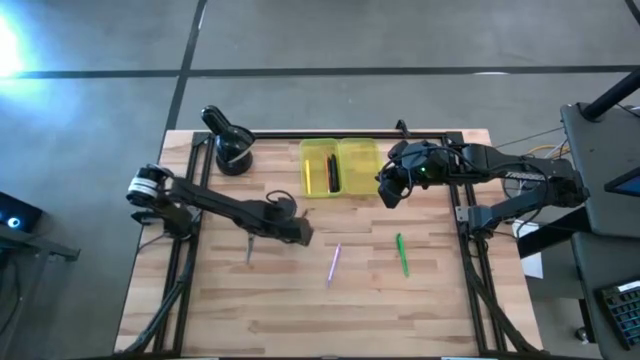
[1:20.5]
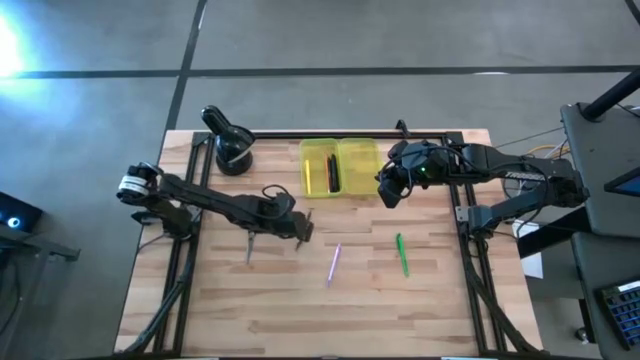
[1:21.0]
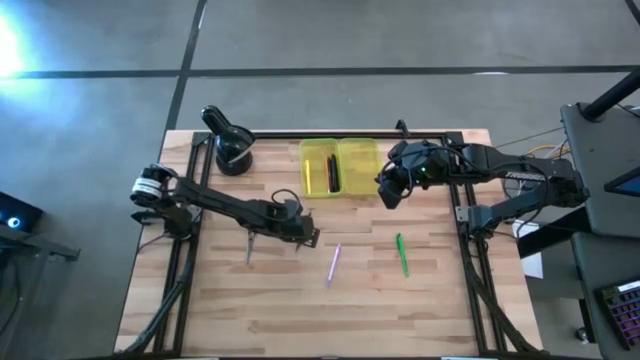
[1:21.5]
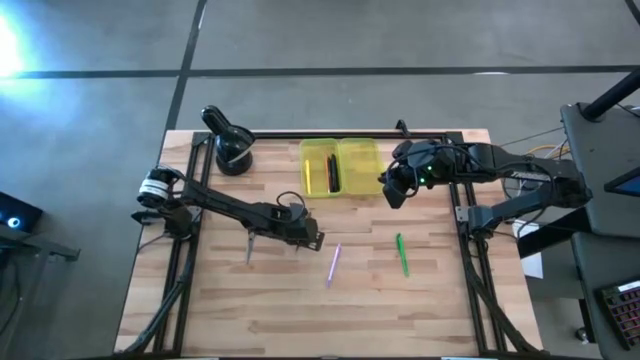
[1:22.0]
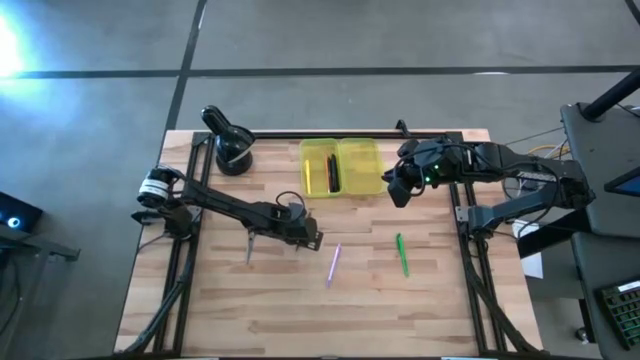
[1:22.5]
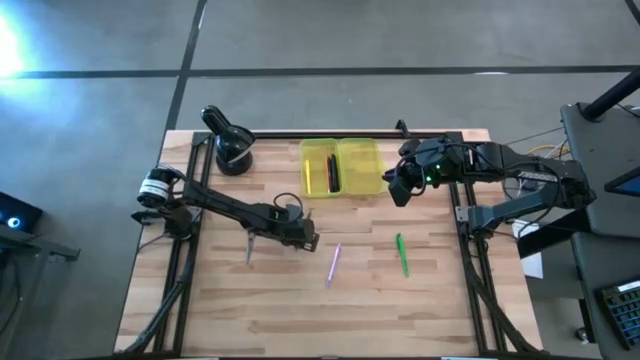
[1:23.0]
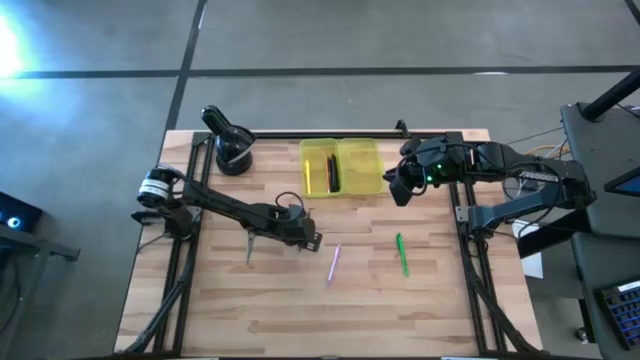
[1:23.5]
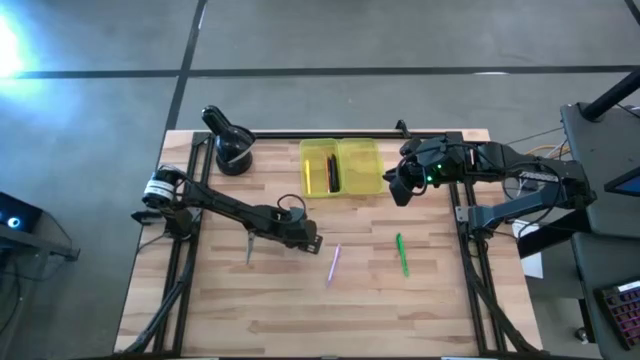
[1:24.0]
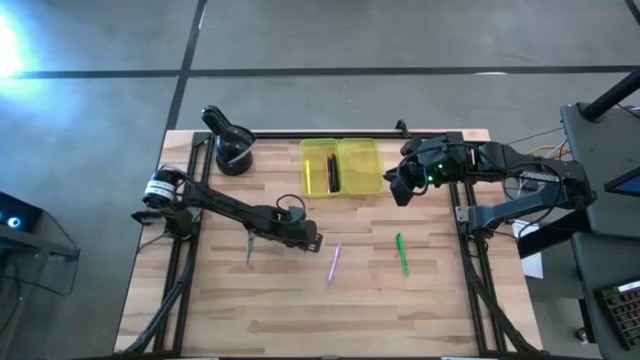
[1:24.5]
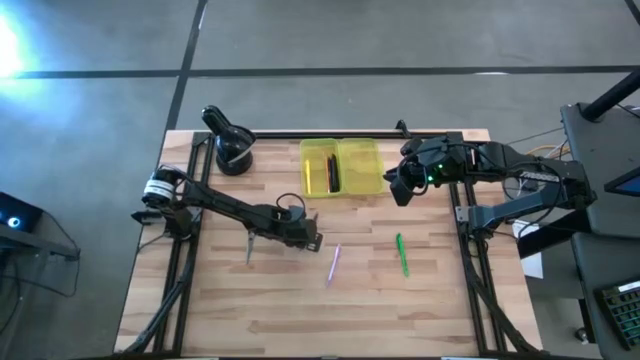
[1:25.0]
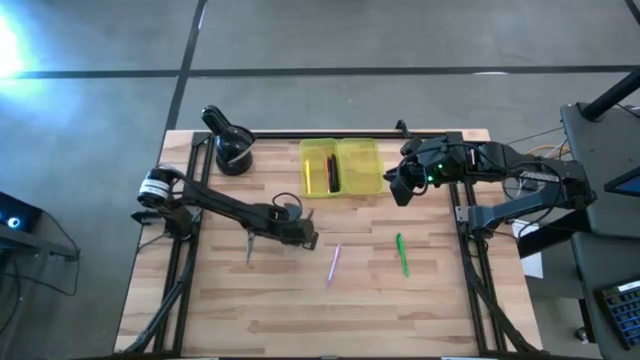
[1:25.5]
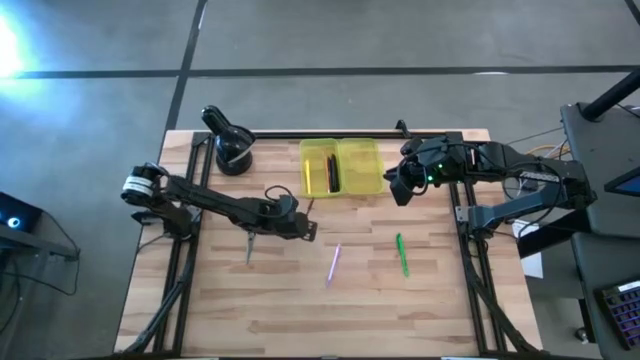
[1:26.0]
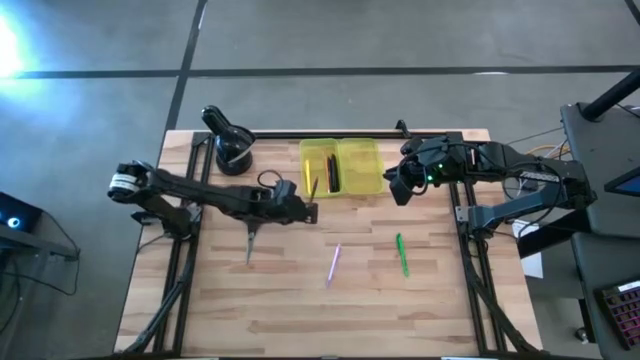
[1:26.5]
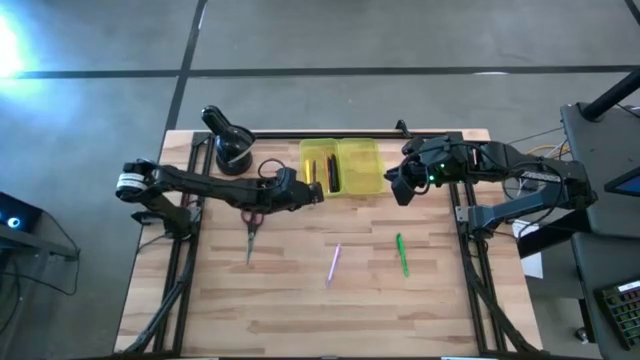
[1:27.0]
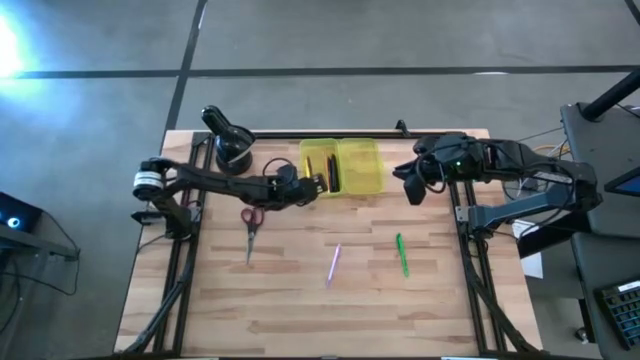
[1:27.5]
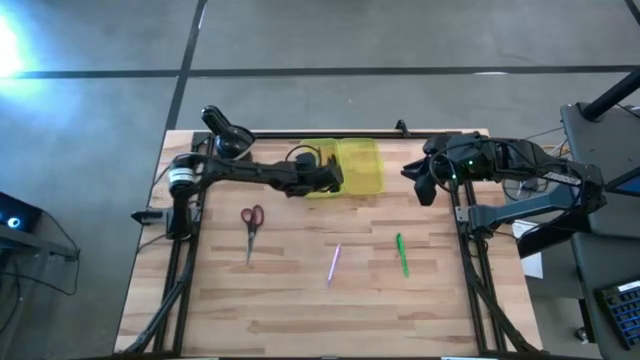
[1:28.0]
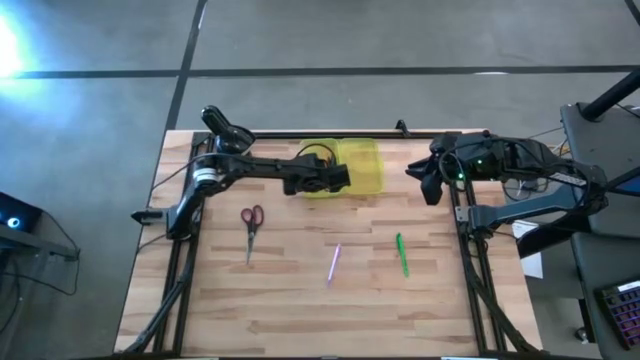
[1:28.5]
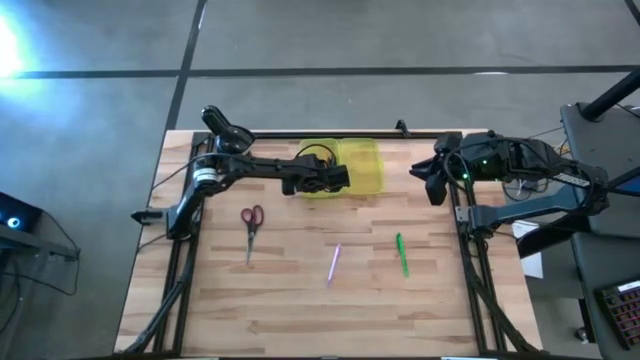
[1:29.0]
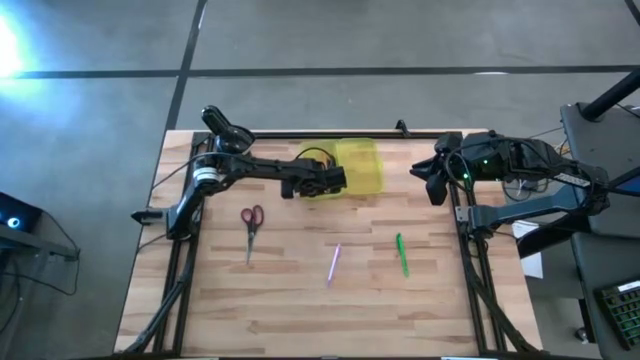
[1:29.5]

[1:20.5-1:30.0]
Task: Pick & place school supplies into a supply box
Put the brown pen into the yellow supply box

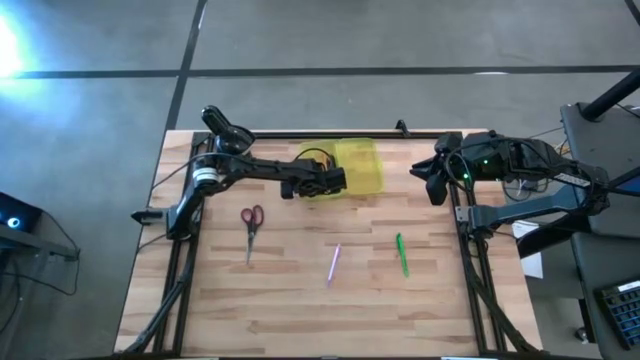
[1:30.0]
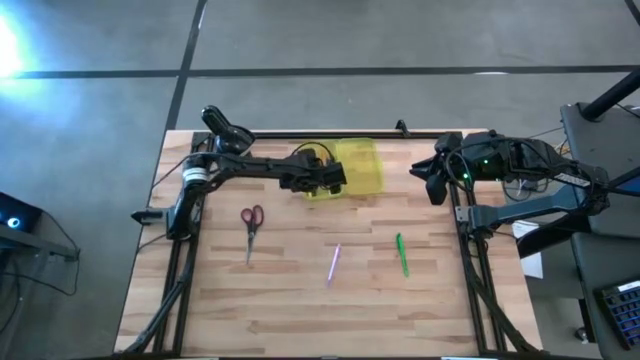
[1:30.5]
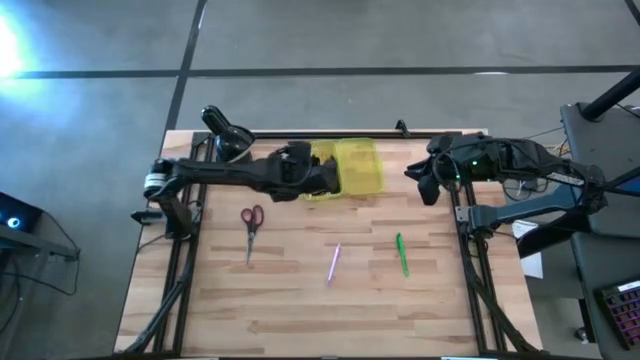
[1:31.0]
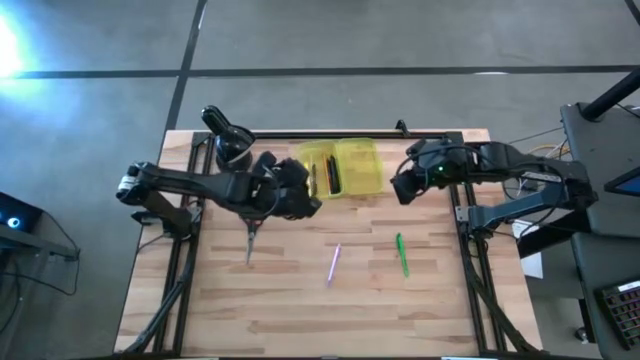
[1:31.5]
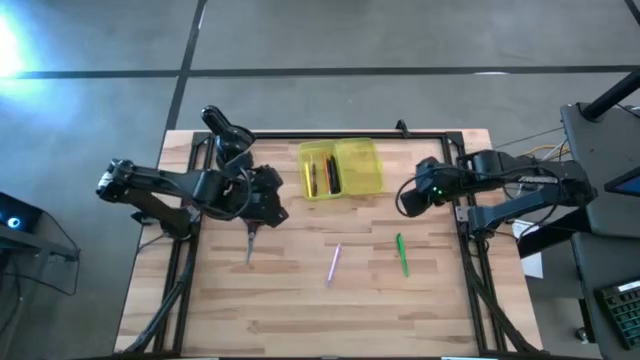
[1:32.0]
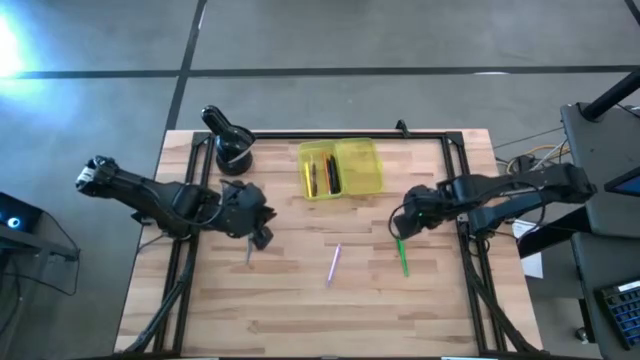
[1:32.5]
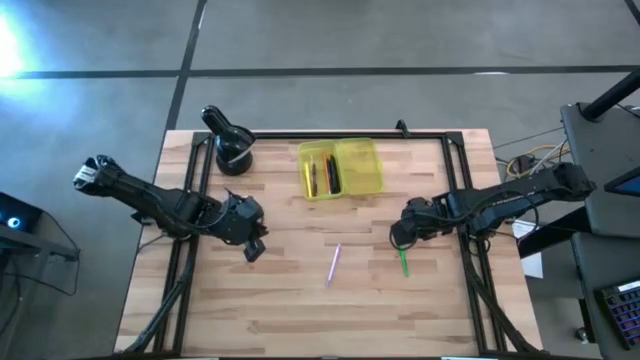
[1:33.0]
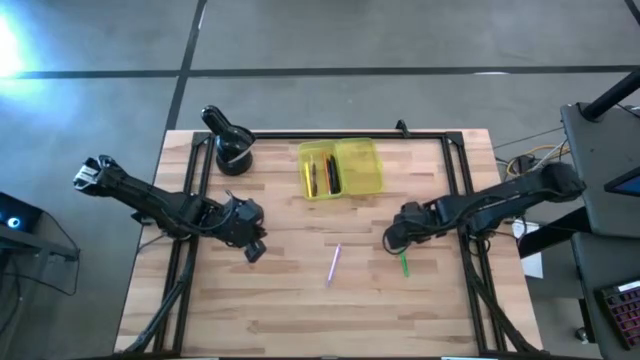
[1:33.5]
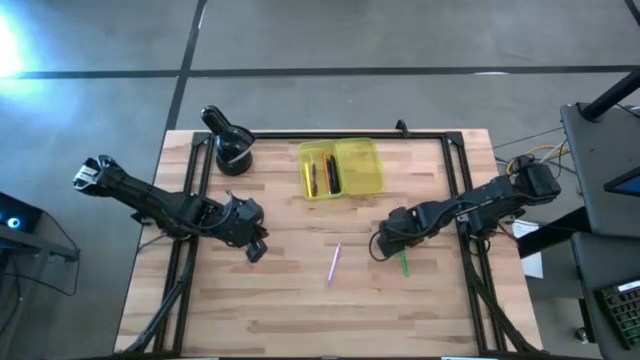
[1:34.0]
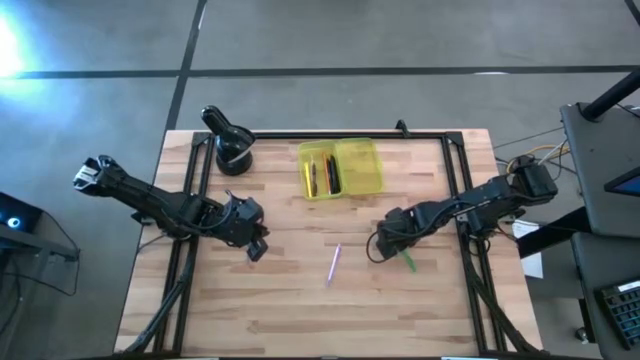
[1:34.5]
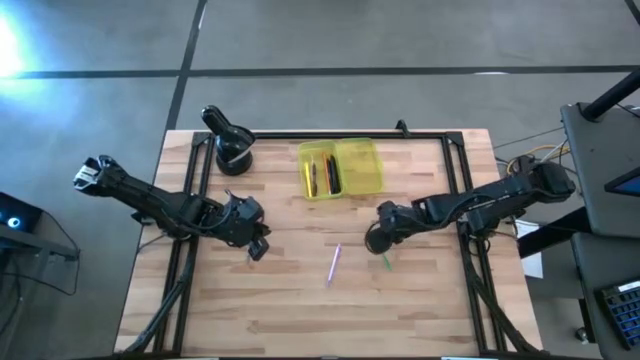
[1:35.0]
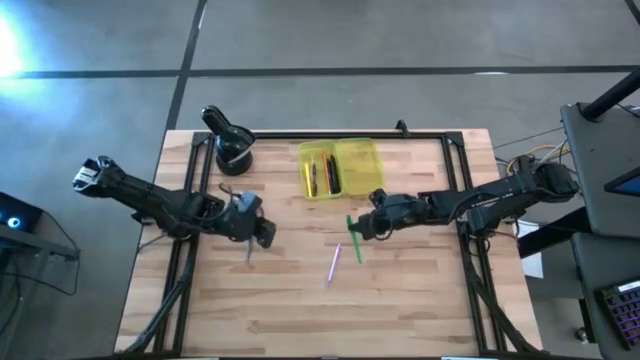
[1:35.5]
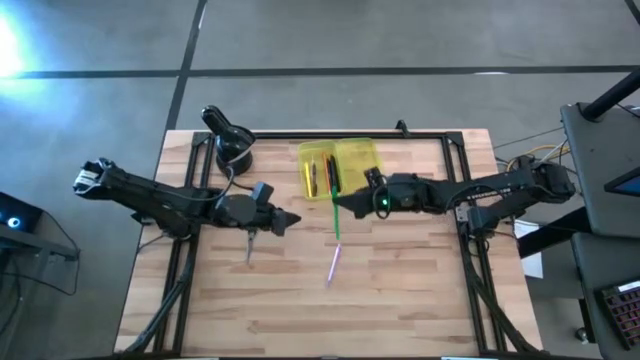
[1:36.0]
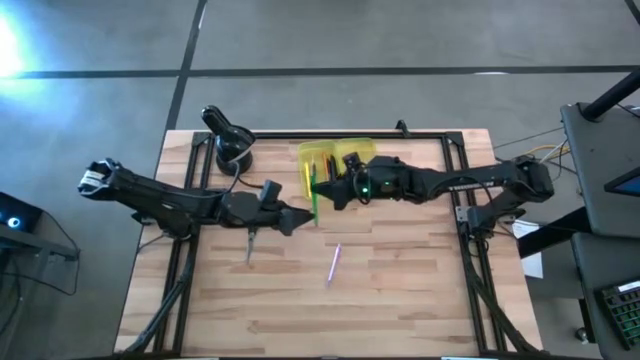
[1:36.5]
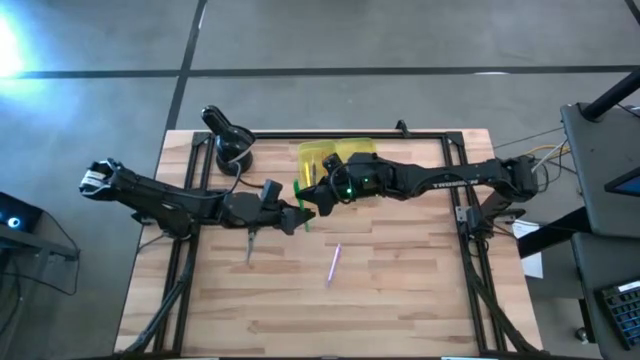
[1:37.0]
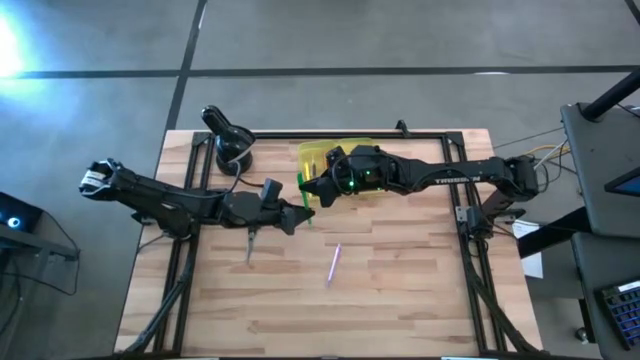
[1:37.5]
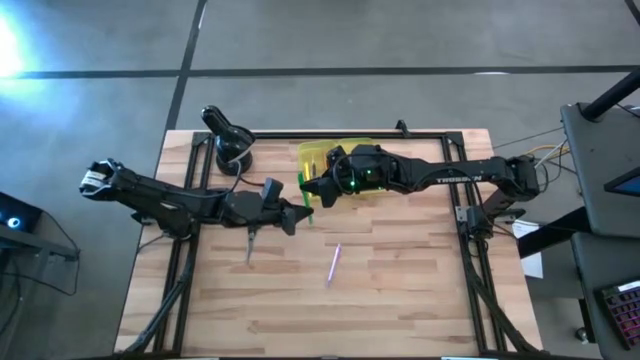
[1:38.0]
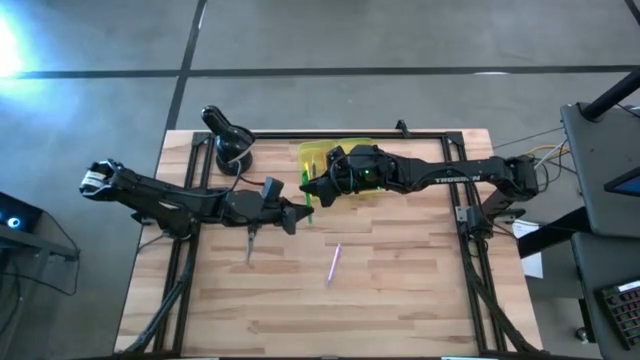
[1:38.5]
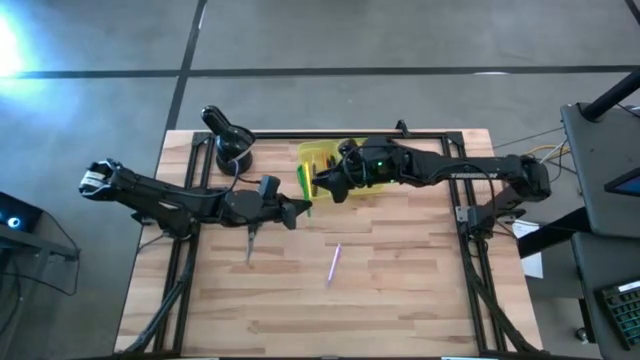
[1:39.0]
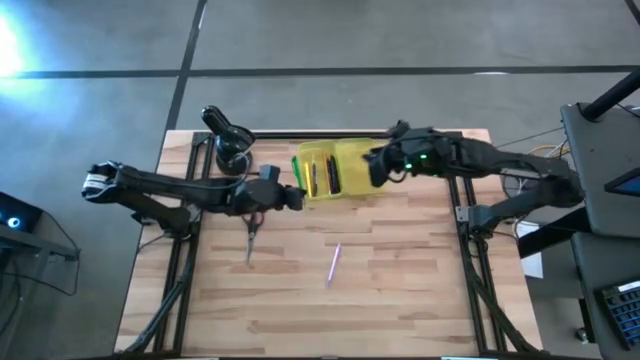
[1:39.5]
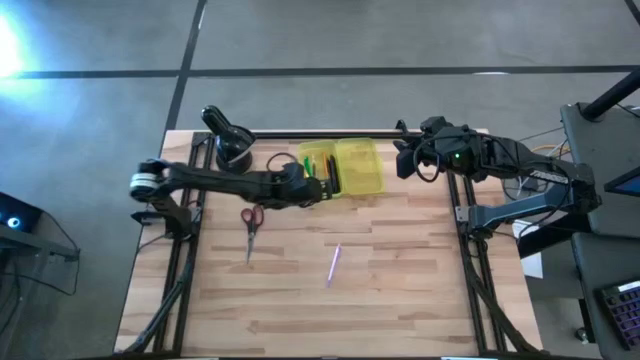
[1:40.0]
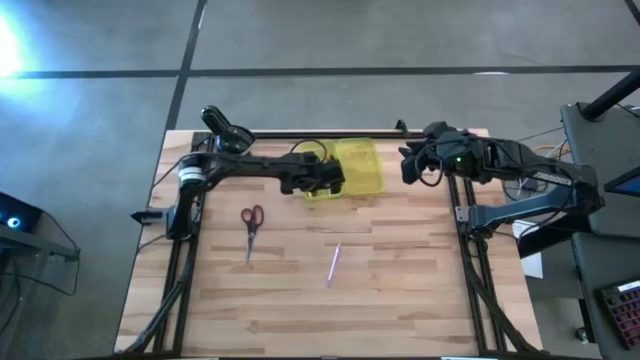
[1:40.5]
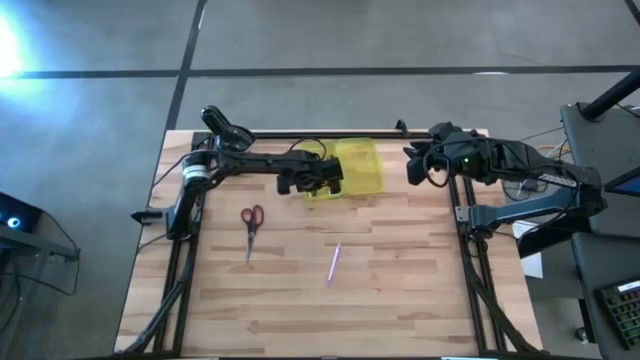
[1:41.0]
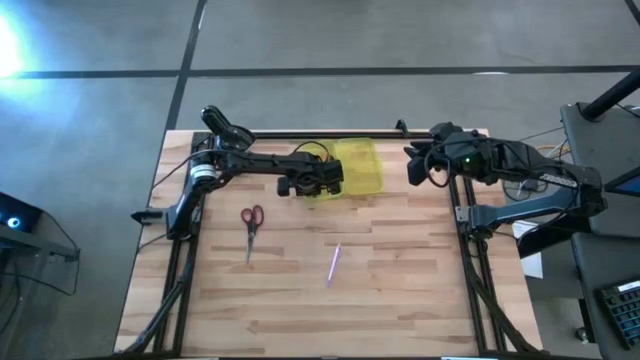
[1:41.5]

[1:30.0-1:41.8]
Put the green pen into the yellow supply box
